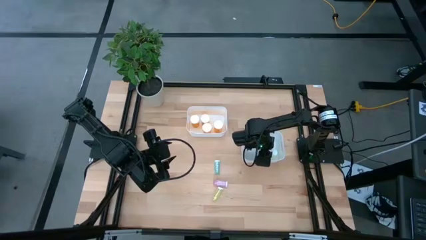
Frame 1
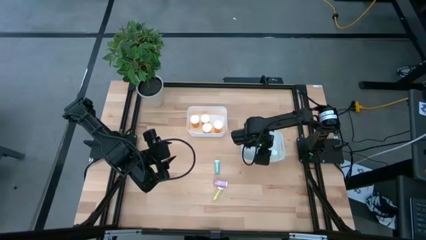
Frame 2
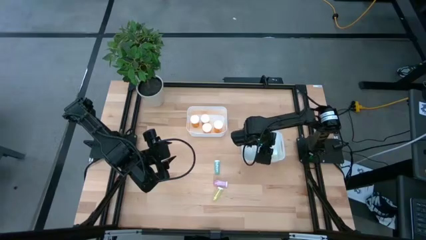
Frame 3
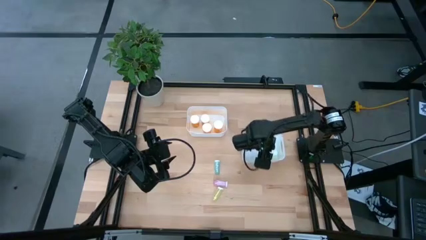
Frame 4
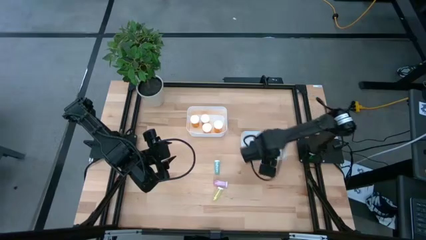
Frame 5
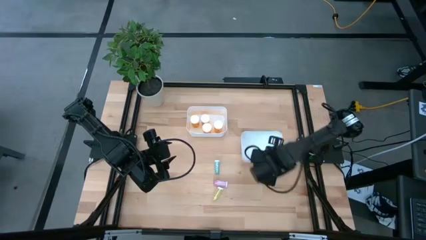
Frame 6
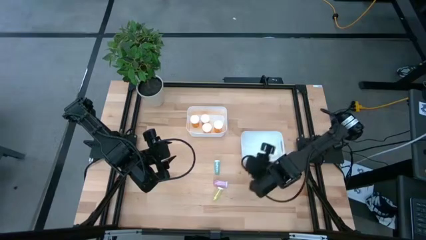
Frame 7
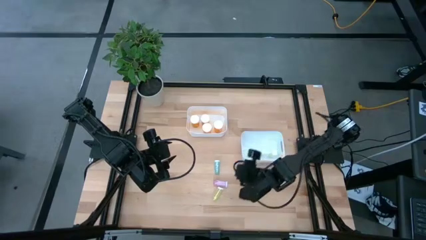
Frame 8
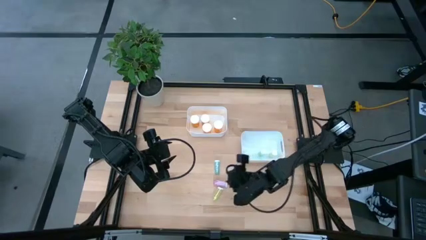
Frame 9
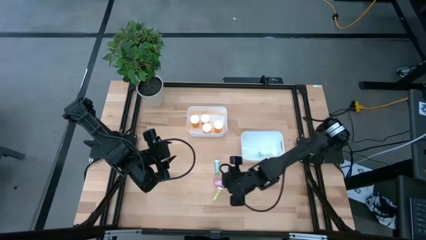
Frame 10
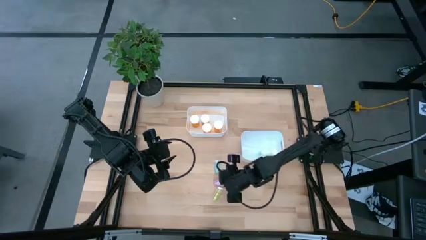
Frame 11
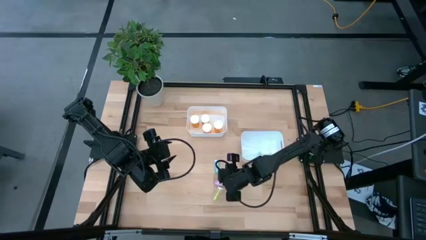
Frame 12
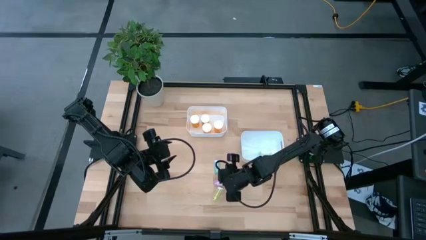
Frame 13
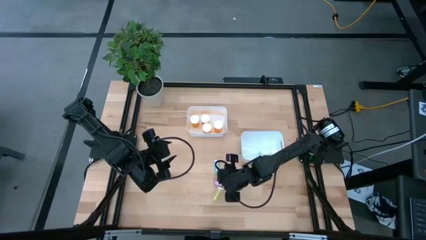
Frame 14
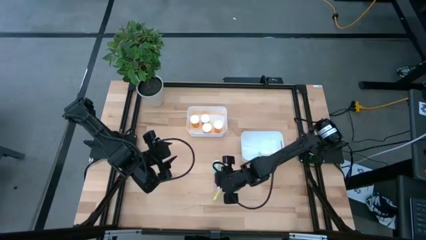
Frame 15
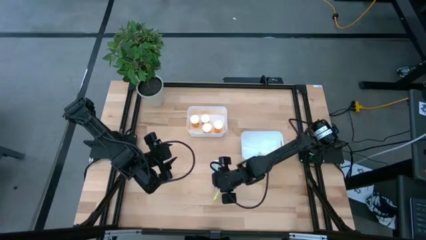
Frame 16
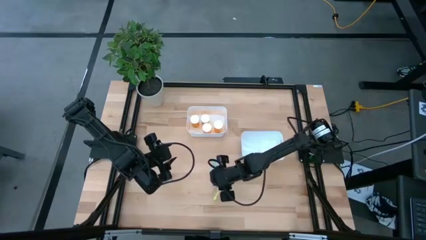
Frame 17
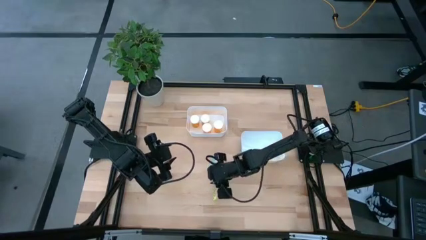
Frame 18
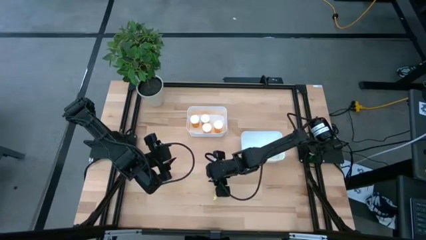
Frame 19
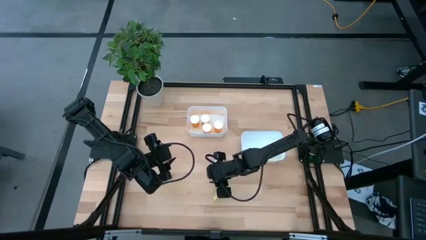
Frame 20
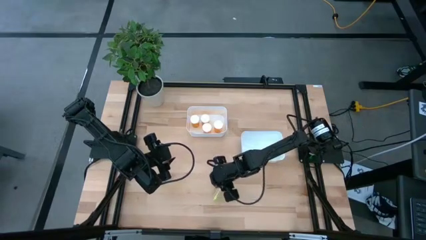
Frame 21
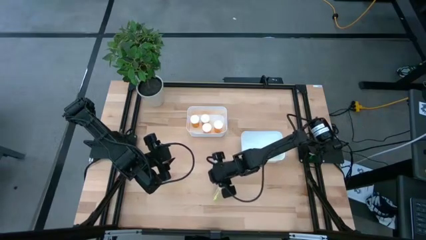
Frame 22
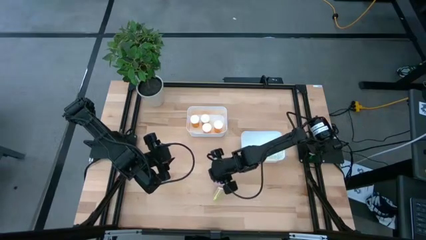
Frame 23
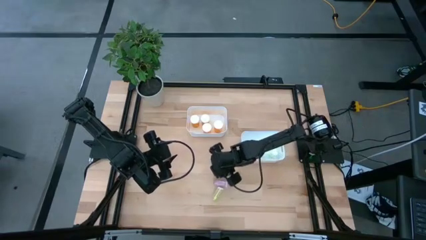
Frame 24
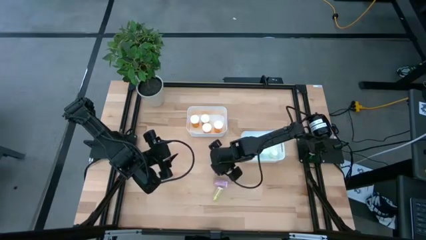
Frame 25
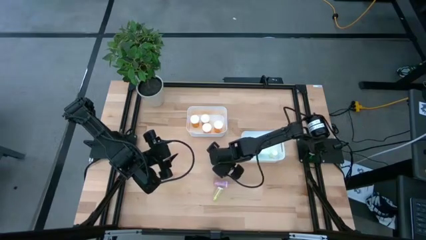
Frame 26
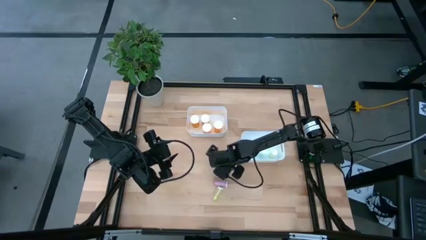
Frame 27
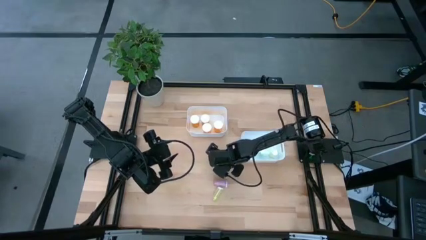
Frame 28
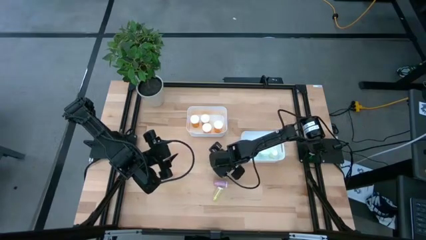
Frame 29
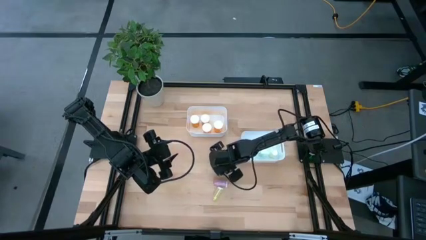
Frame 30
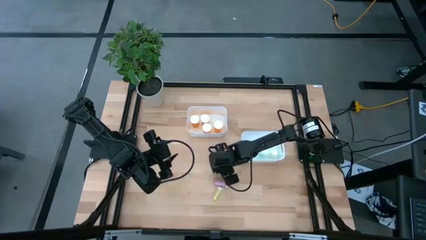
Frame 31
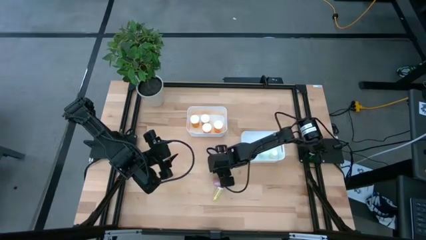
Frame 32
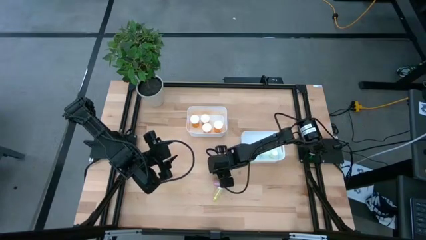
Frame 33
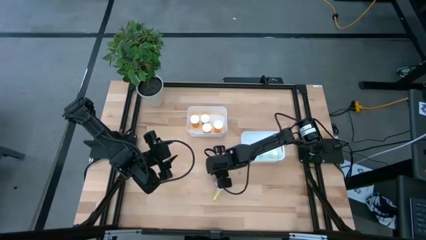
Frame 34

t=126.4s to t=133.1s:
Task: Pick and place medicine bottles into bin by pill shape (circle, oval)
Put the small blue pill bottle into the bottom white bin

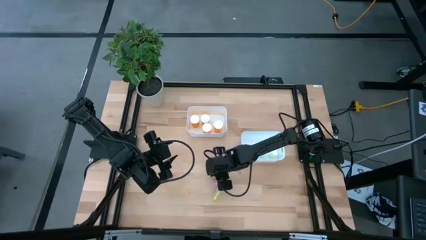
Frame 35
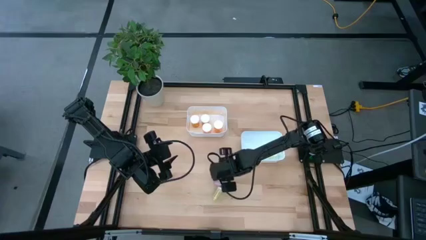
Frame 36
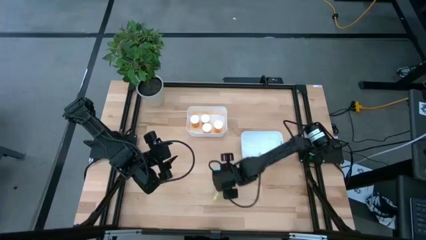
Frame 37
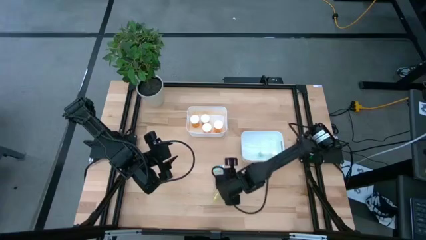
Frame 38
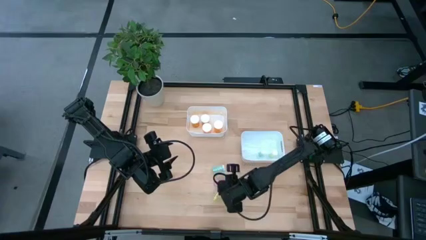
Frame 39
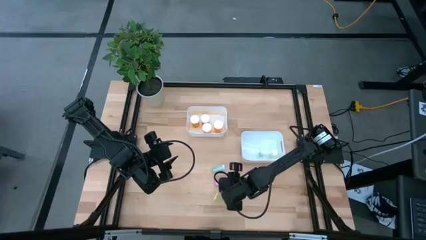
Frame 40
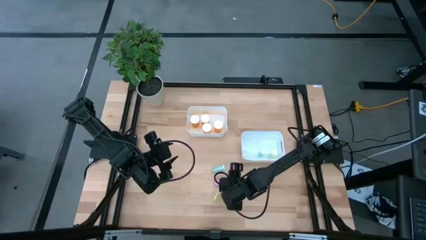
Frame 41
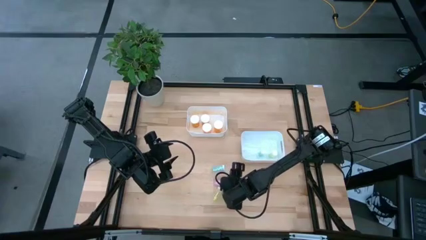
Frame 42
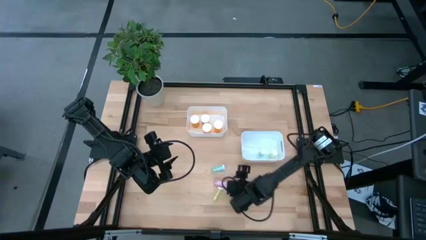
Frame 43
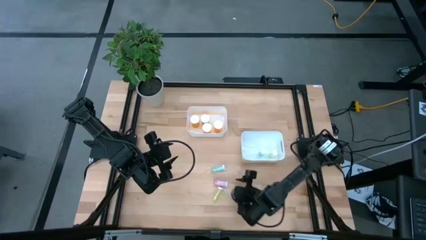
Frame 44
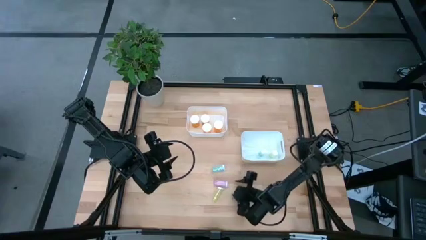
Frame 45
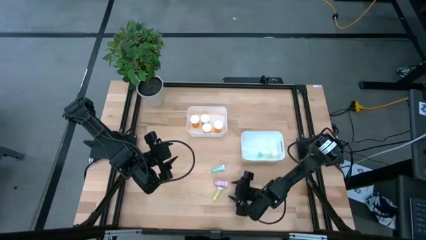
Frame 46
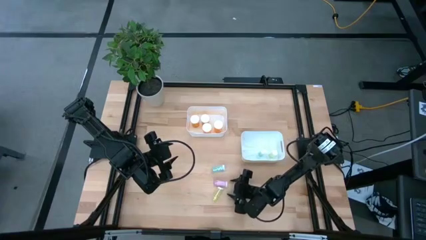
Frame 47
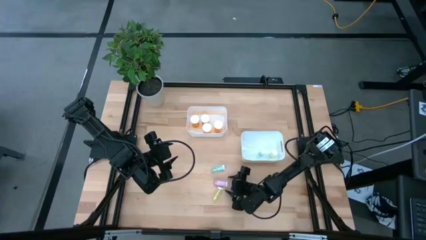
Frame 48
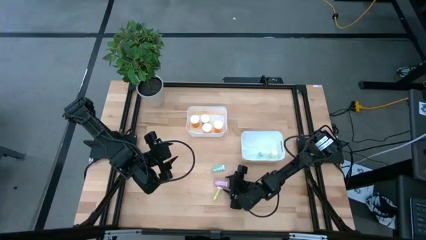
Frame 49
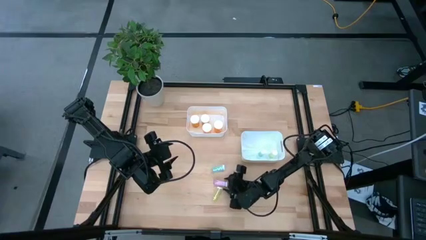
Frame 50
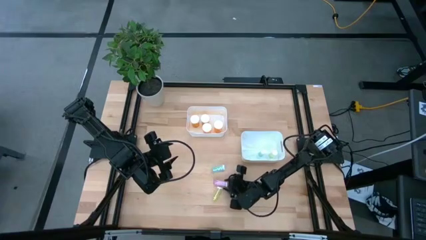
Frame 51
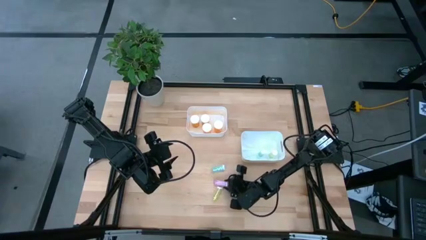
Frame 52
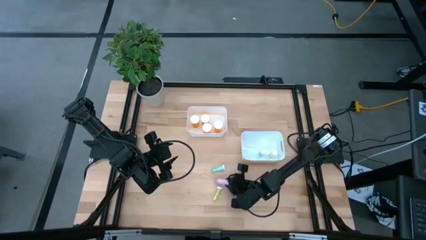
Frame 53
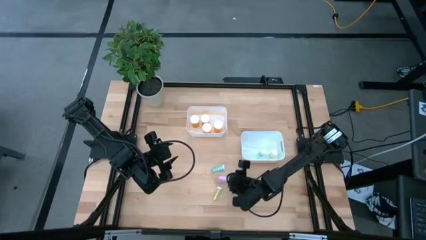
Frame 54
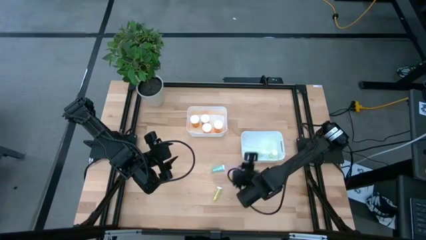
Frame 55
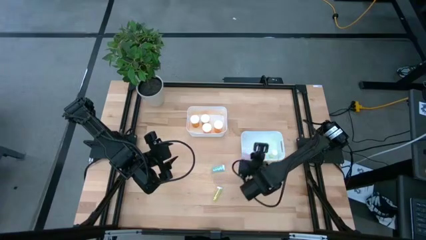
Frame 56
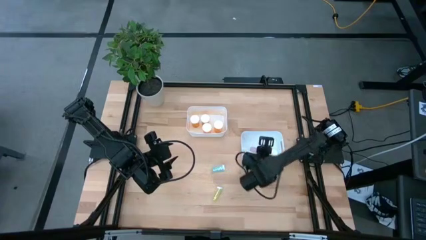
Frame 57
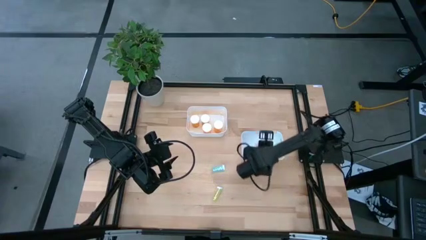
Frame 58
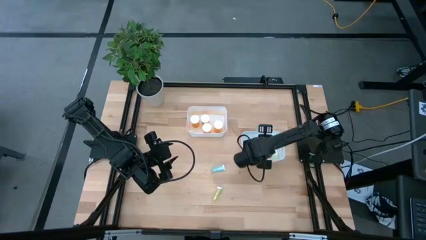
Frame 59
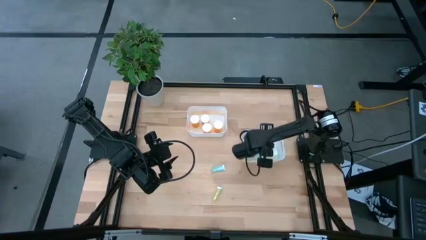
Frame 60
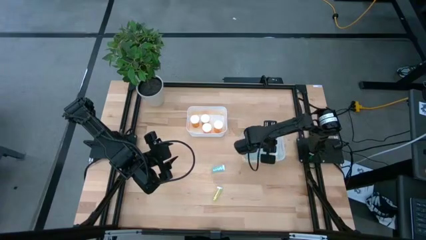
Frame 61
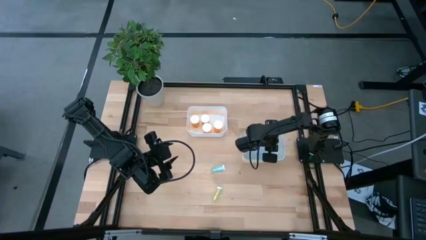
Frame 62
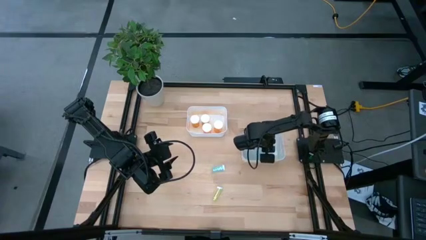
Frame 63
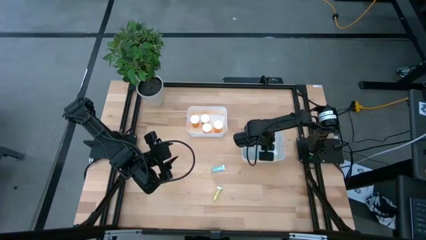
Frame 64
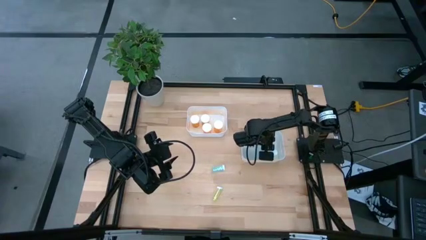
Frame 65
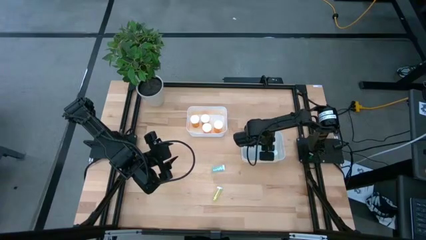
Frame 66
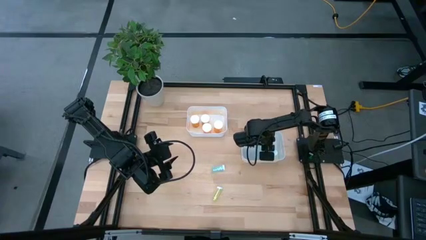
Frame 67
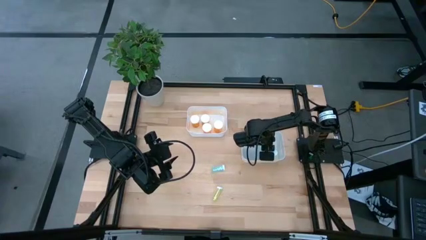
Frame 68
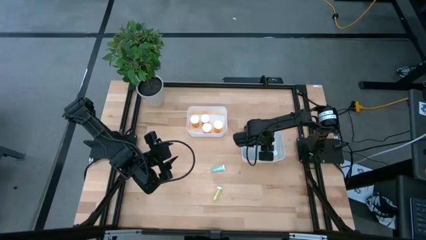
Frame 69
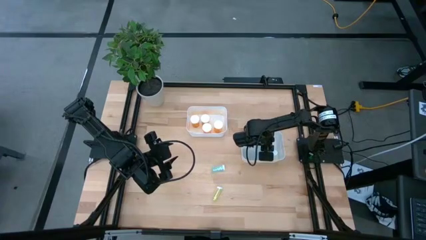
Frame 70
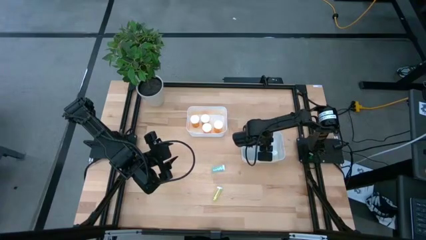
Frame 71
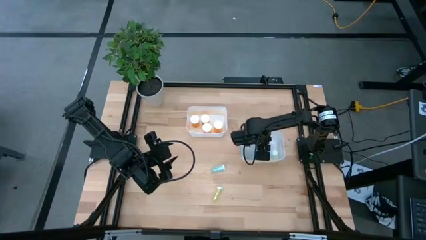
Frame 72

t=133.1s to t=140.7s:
Put the small pink pill bottle into the bottom white bin

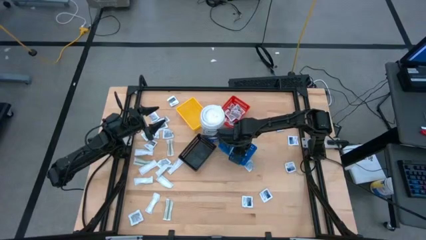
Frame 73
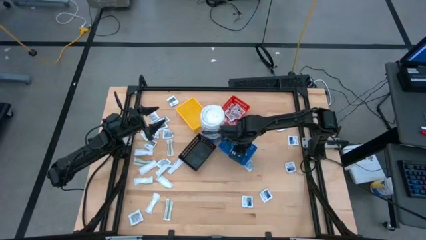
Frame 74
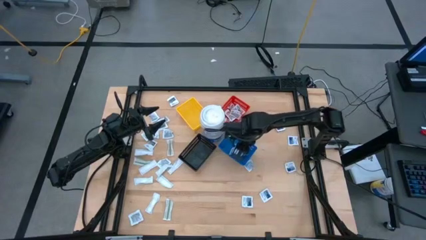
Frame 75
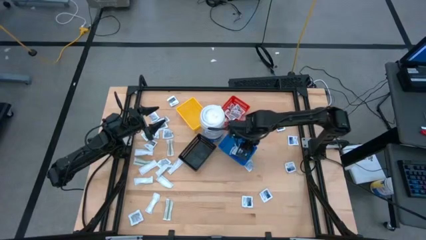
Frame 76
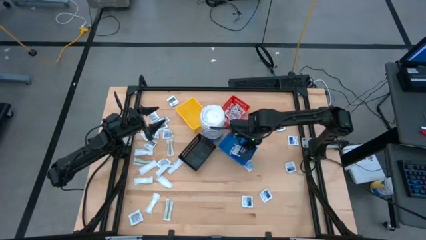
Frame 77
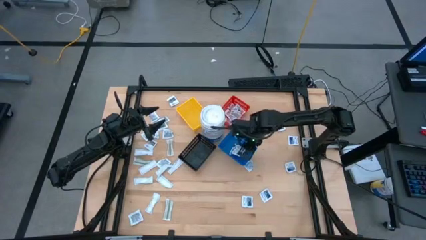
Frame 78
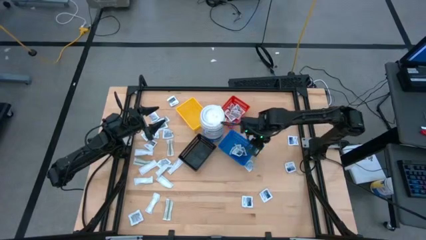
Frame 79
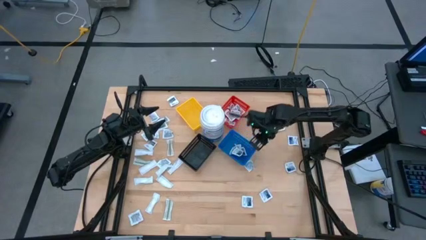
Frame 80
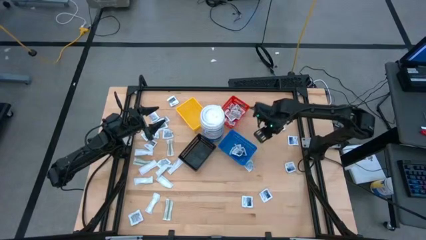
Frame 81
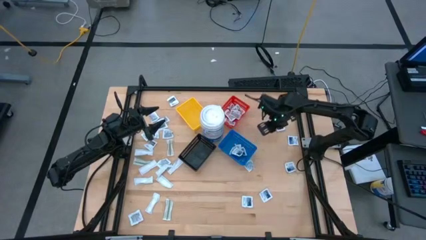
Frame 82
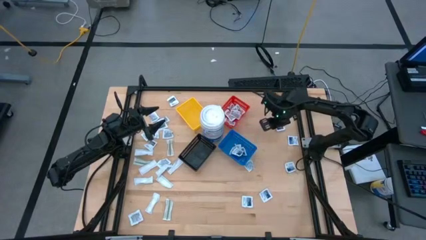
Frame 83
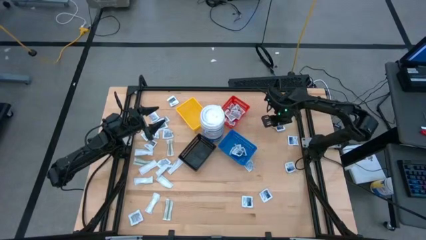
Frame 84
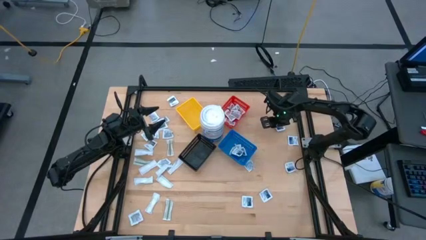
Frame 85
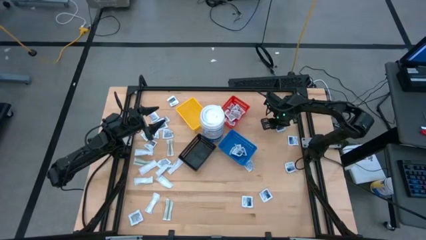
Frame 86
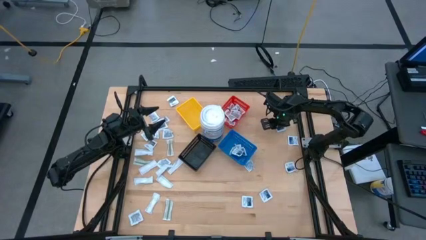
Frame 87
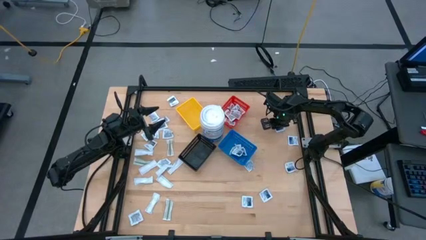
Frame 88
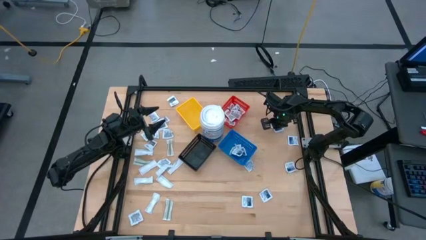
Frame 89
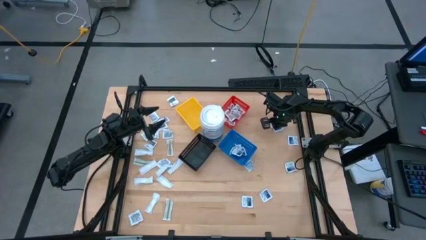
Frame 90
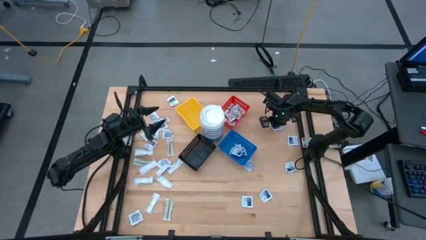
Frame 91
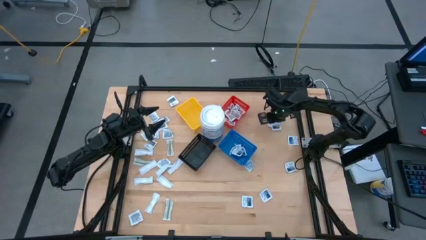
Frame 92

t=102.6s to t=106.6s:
Task: Pick & Place First Aid Supplies
Put the alcohol pad into the blue bin
